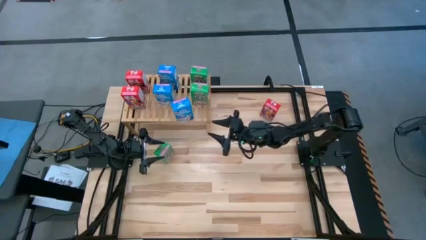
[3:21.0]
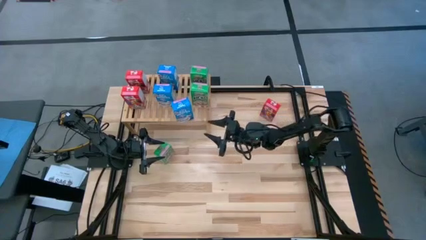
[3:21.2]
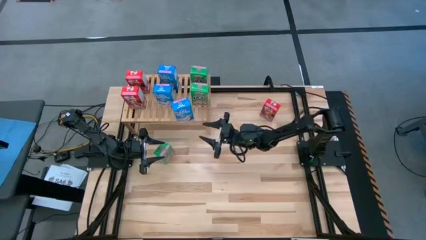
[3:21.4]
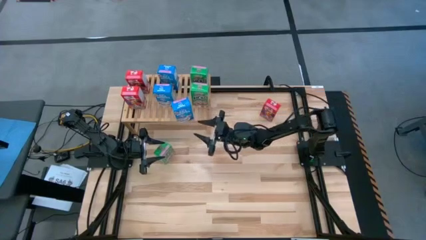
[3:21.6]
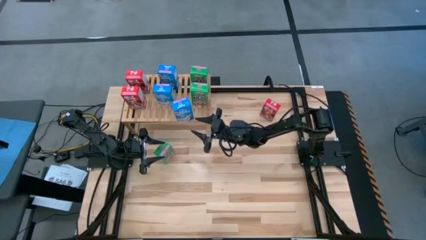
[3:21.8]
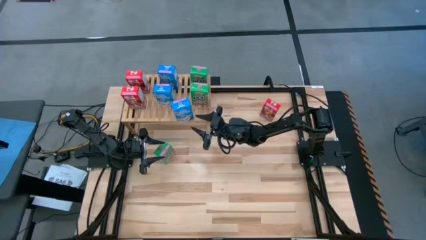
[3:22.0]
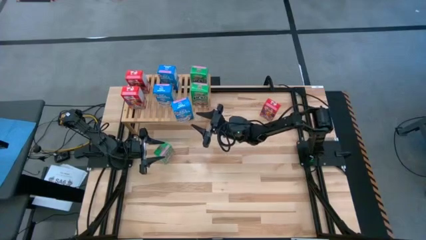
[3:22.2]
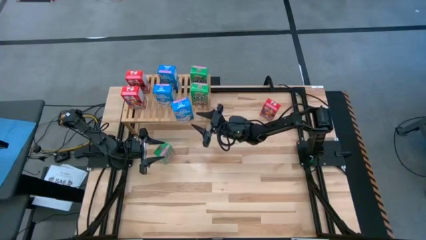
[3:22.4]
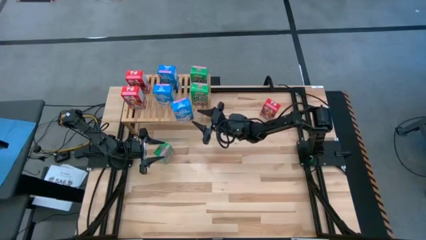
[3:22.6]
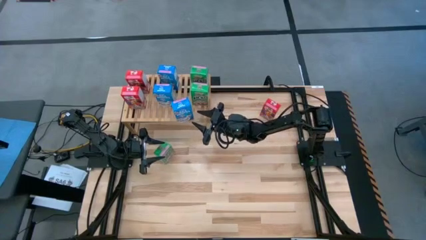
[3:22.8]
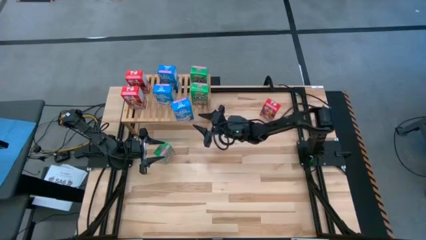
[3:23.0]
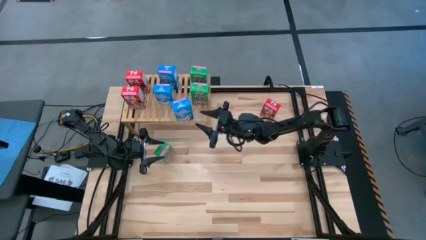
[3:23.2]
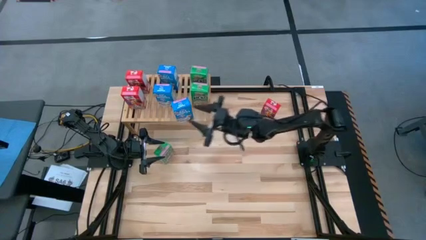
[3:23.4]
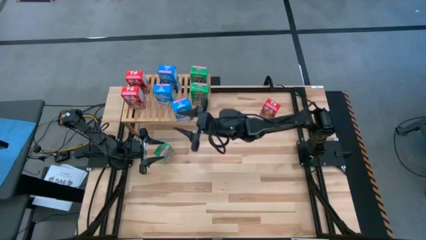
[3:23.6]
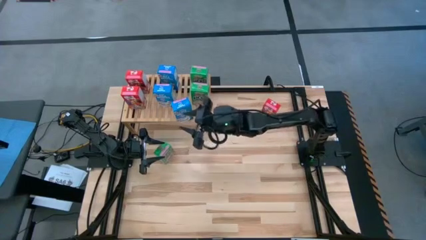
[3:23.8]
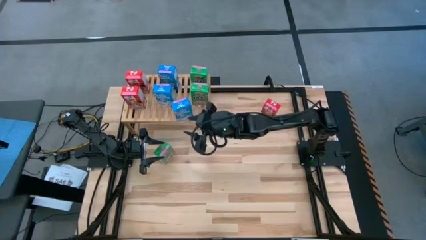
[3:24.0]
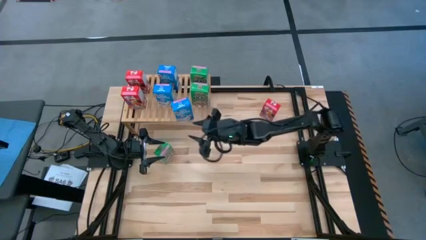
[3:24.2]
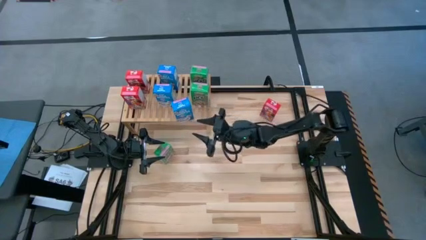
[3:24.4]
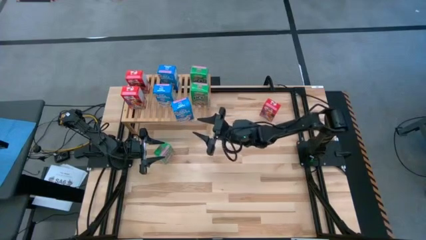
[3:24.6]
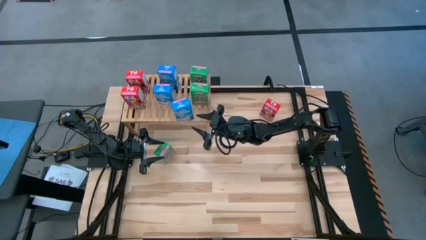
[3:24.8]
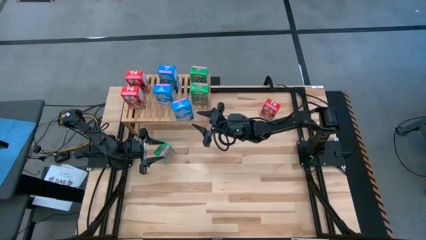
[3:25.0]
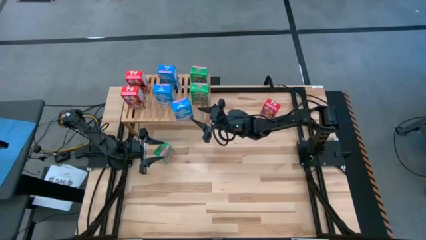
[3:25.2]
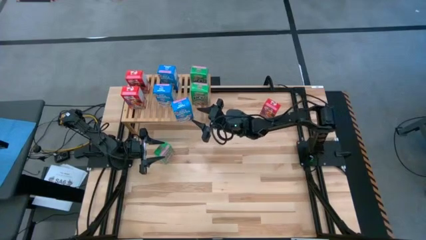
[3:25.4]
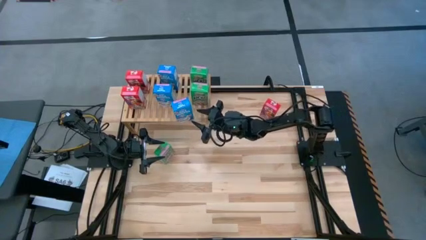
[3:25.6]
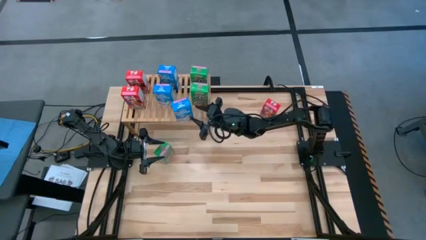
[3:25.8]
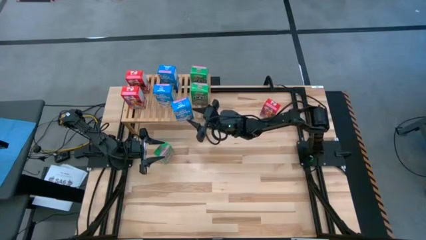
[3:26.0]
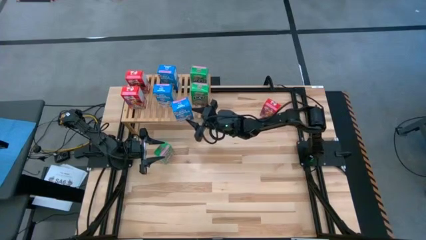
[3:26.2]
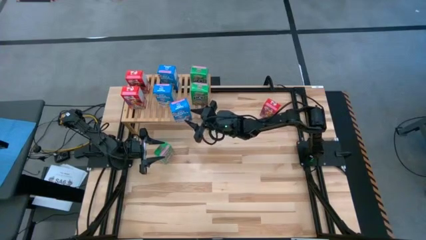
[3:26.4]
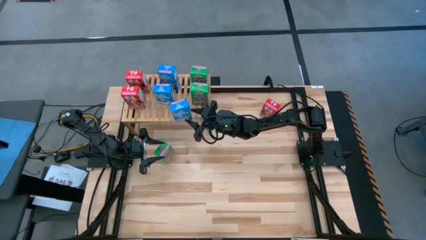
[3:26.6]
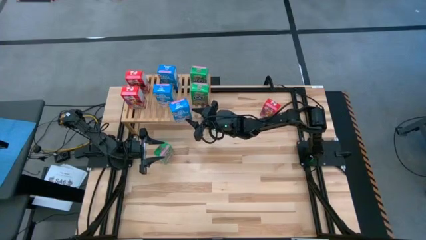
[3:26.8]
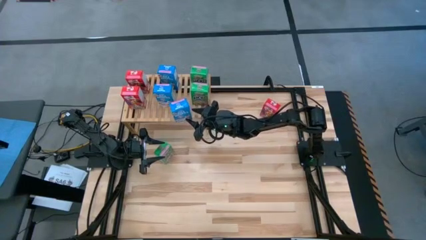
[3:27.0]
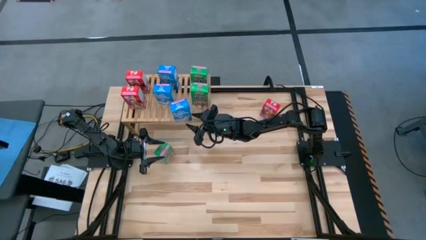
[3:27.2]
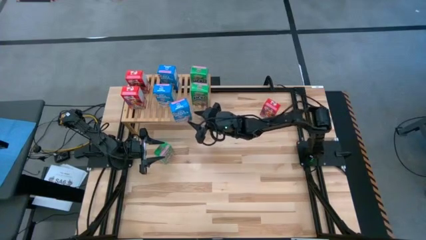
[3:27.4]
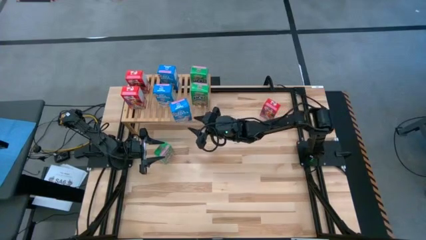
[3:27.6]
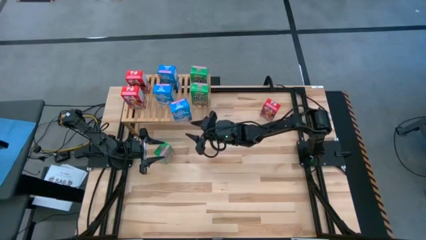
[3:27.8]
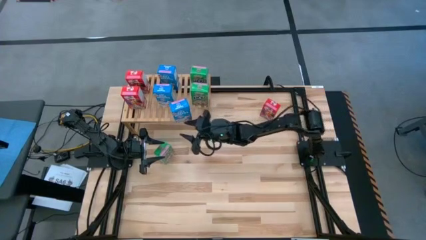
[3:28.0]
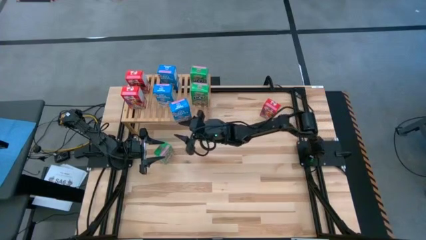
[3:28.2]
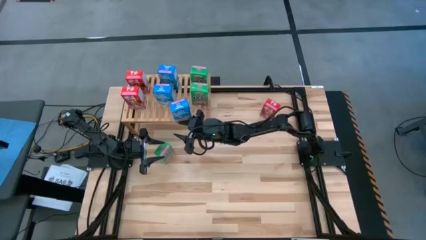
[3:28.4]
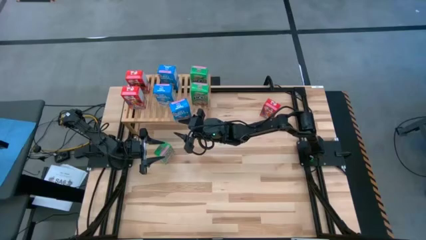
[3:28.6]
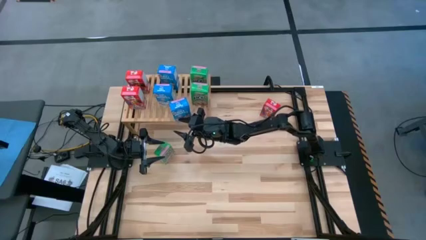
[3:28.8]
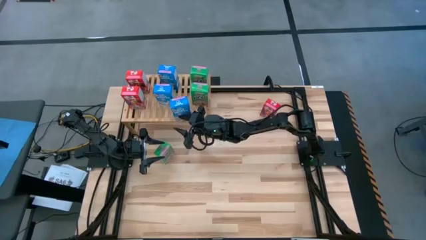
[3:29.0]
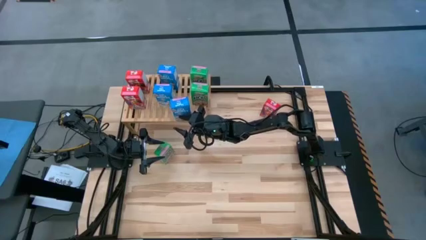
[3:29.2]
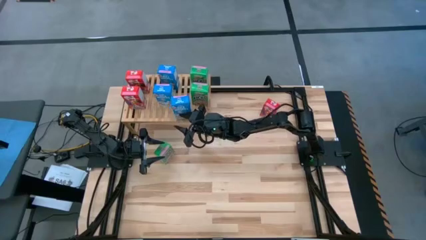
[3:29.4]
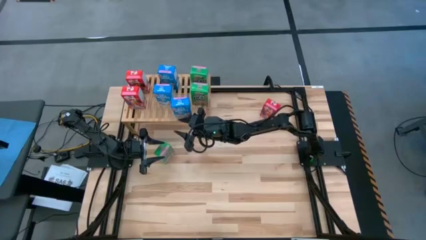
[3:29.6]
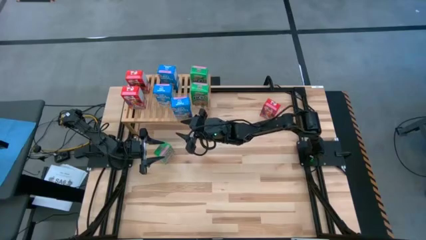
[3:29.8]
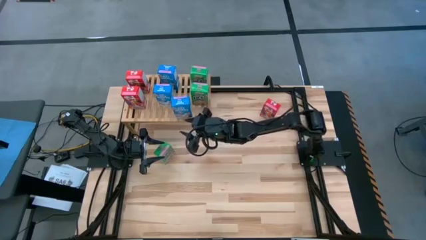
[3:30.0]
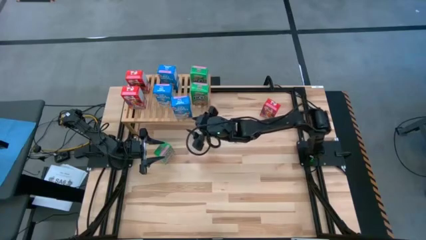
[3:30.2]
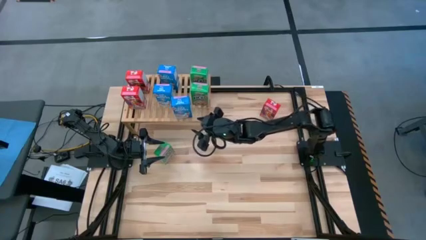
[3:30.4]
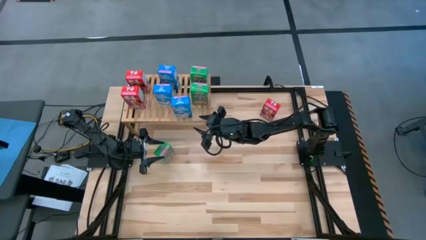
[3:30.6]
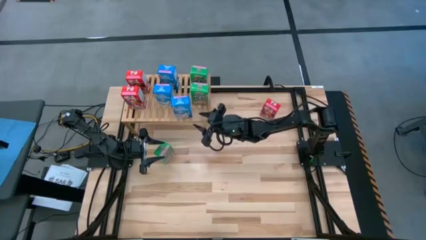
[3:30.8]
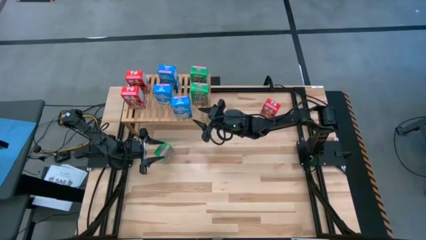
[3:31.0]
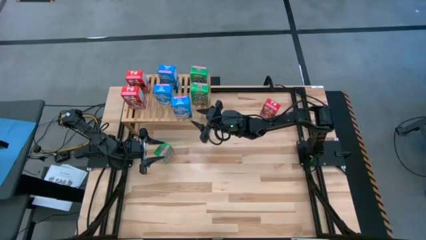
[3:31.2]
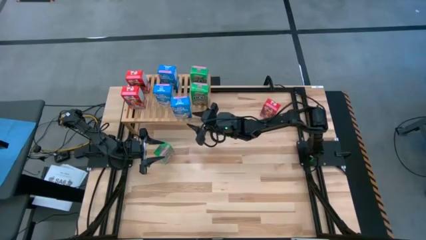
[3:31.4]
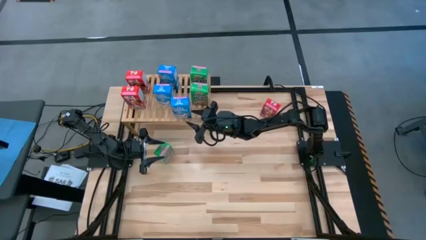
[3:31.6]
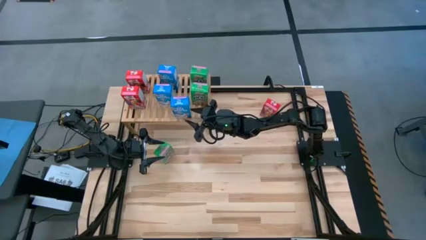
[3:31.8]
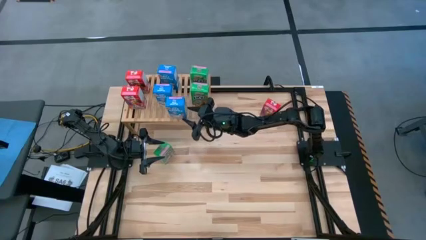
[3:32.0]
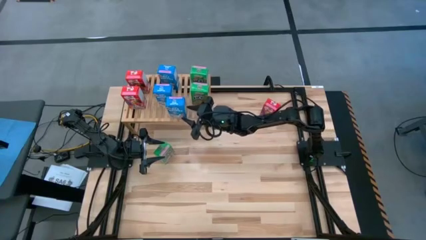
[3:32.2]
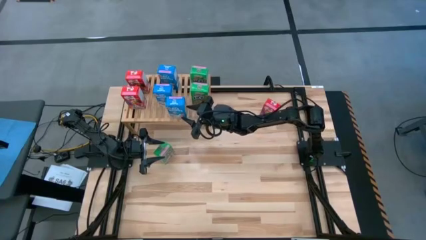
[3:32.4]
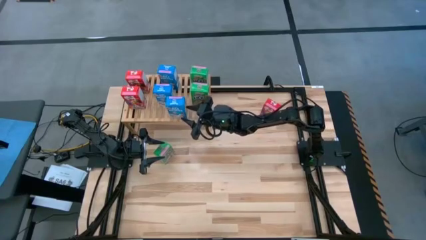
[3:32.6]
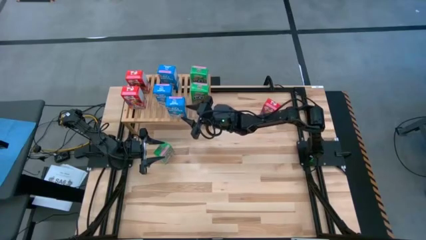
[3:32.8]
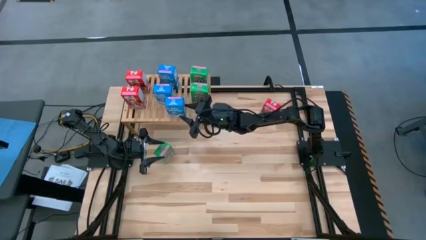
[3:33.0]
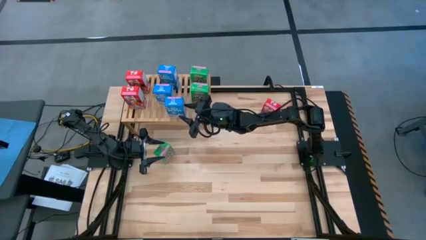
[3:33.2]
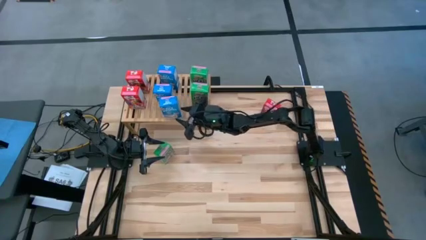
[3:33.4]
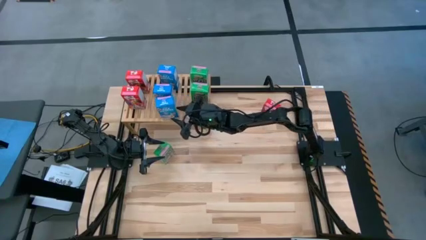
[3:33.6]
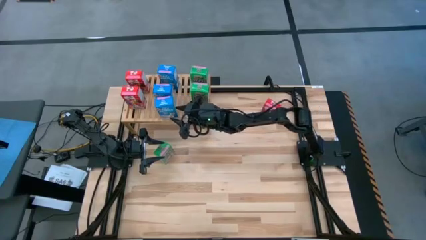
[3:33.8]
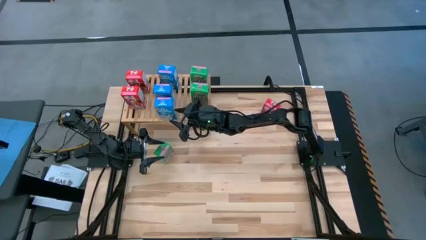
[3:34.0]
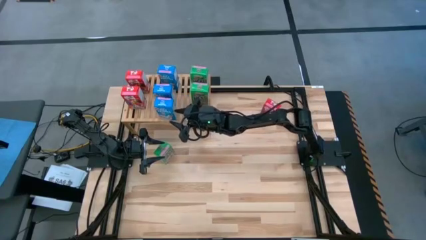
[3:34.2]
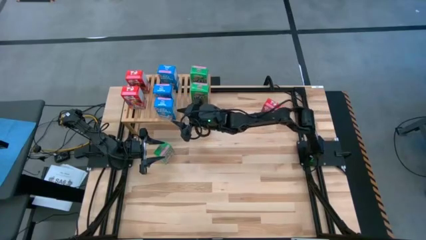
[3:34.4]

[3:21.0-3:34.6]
Task: Stack cereal on shelf
Put the blue cereal box on the shelf aligned with the blue cereal boxes

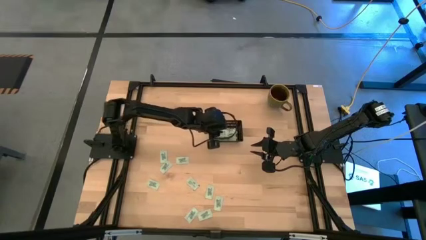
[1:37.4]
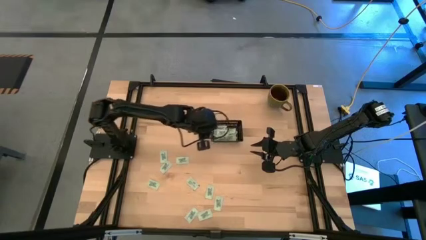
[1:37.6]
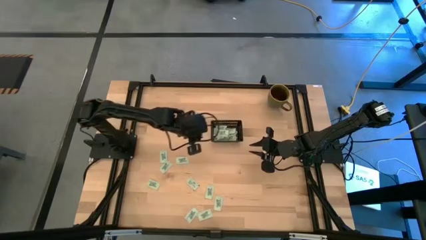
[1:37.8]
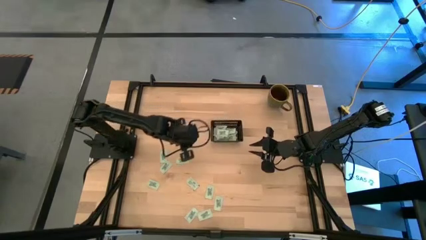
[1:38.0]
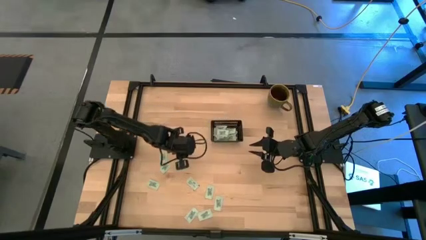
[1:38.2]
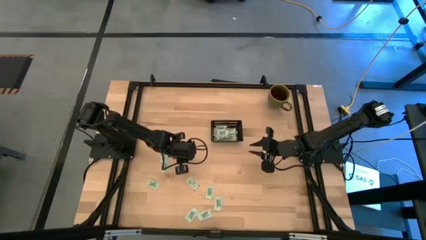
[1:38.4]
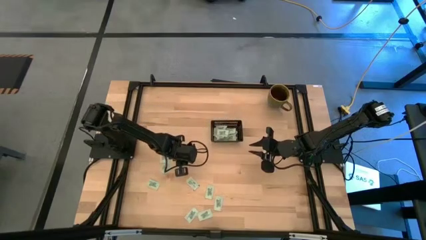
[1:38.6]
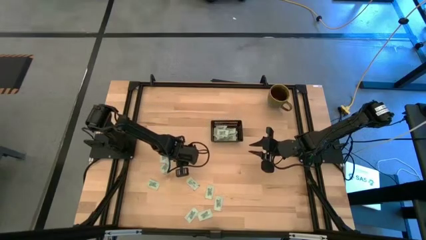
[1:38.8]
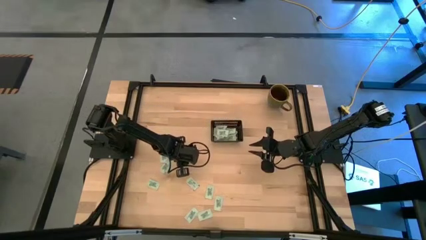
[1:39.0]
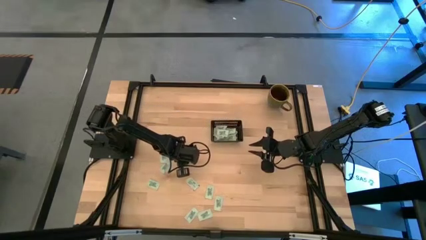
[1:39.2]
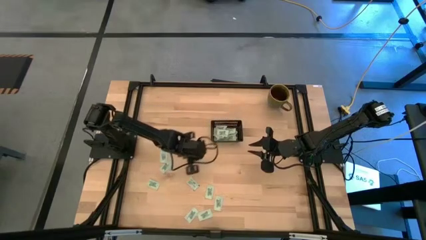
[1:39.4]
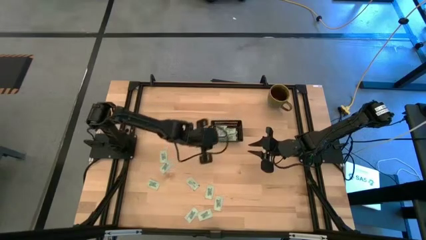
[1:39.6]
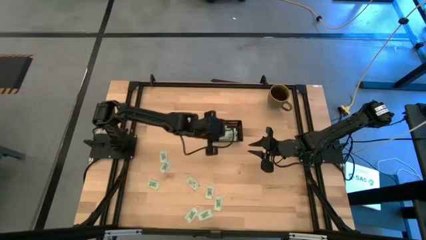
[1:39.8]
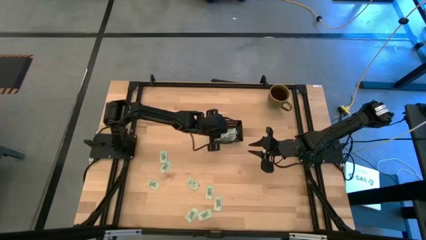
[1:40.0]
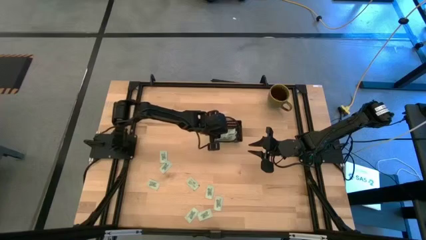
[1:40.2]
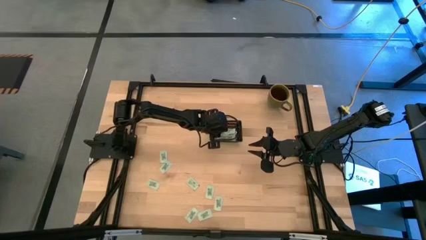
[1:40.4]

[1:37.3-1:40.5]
Task: Pick and place Stevia / Truvia into bins
Put the stevia packet into the black basket
